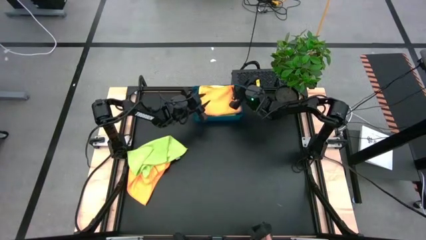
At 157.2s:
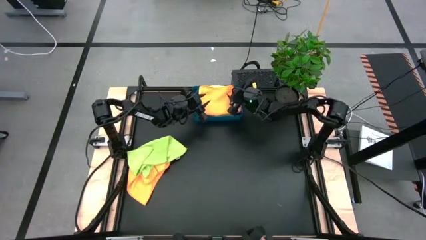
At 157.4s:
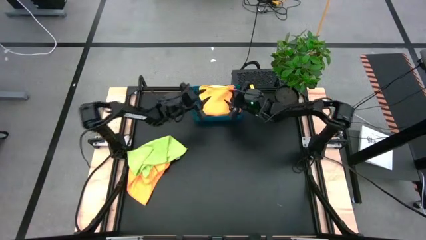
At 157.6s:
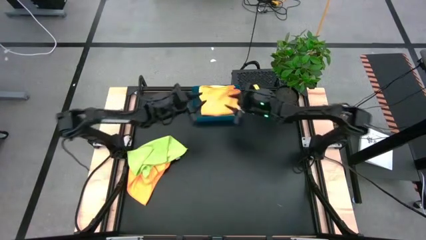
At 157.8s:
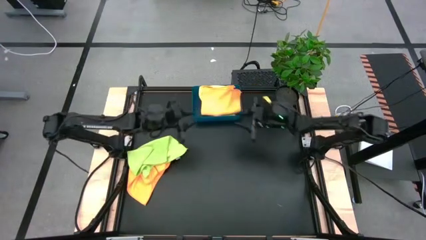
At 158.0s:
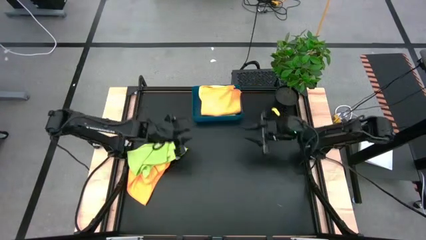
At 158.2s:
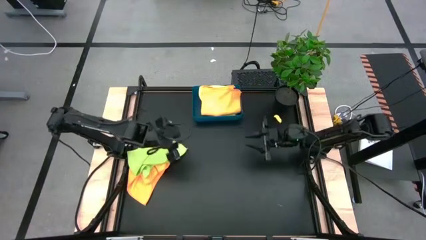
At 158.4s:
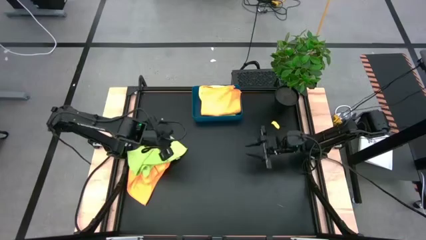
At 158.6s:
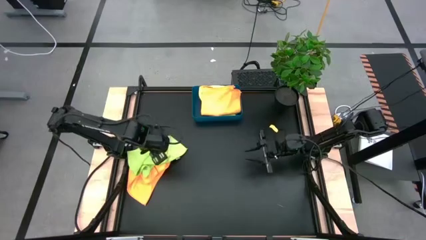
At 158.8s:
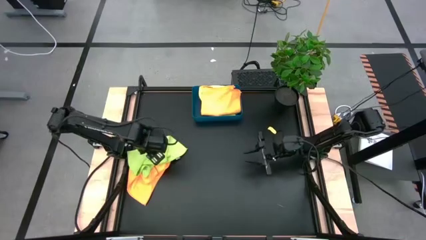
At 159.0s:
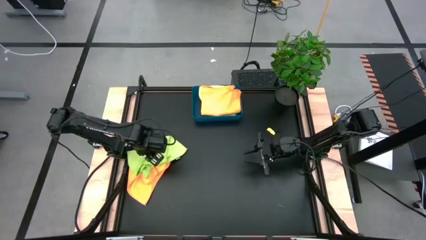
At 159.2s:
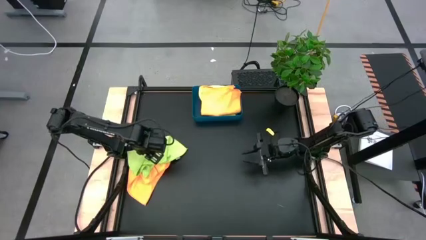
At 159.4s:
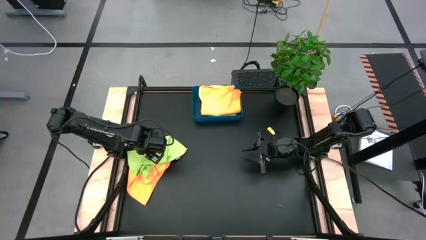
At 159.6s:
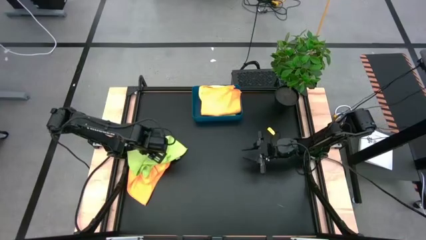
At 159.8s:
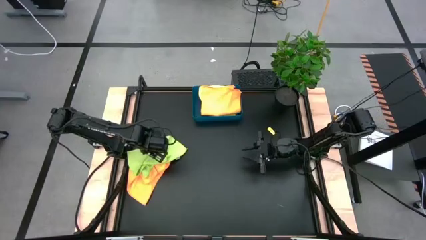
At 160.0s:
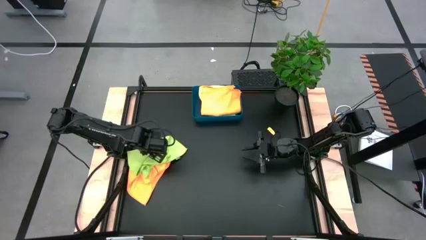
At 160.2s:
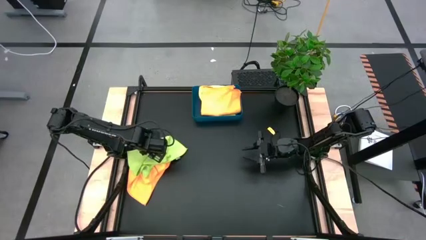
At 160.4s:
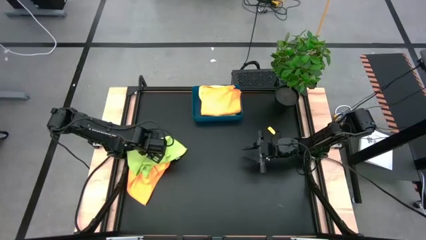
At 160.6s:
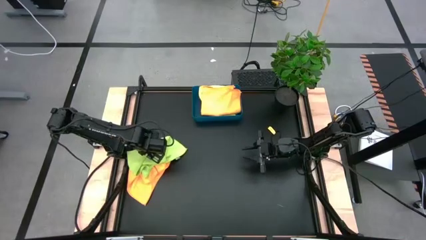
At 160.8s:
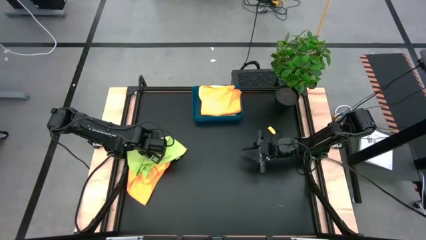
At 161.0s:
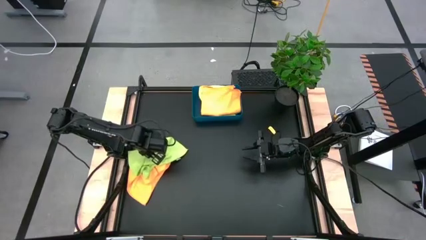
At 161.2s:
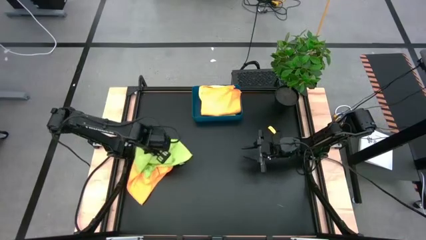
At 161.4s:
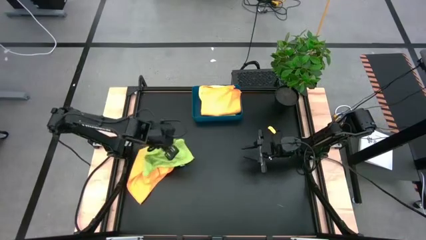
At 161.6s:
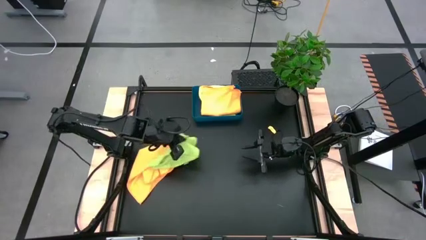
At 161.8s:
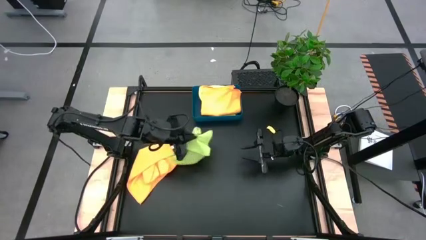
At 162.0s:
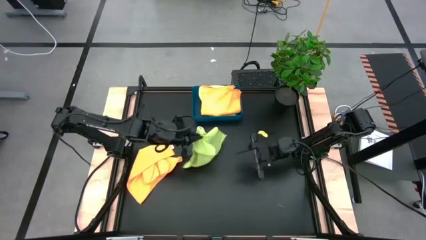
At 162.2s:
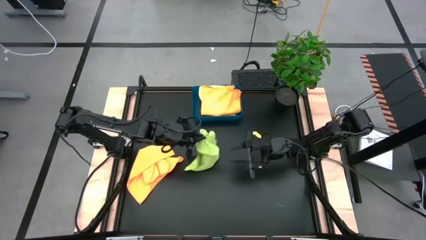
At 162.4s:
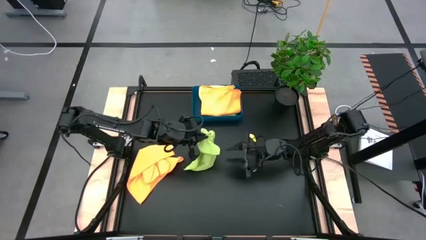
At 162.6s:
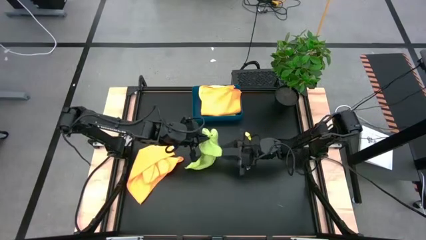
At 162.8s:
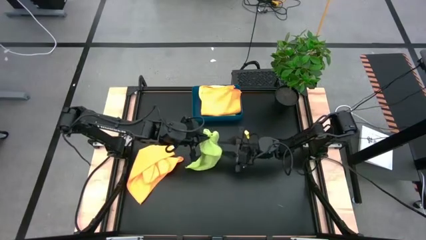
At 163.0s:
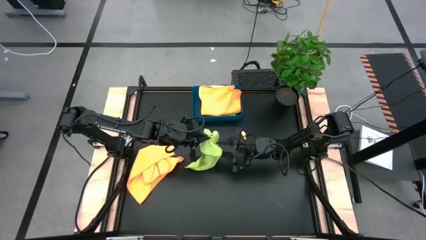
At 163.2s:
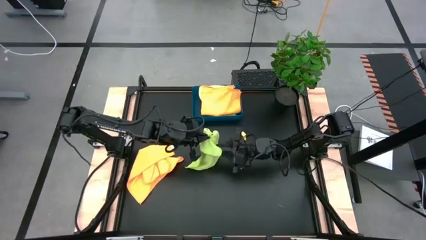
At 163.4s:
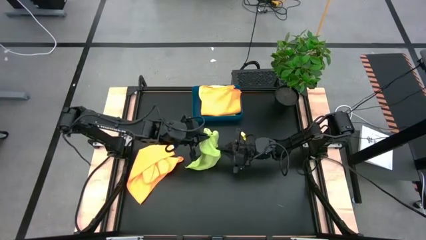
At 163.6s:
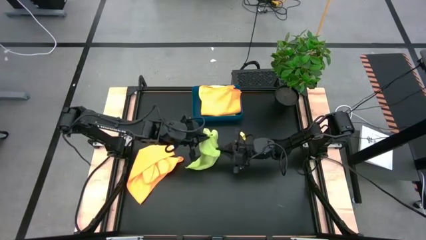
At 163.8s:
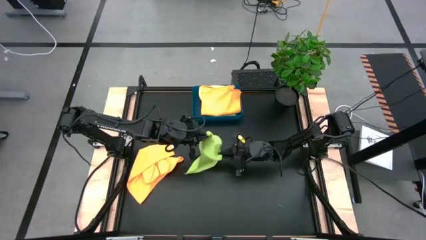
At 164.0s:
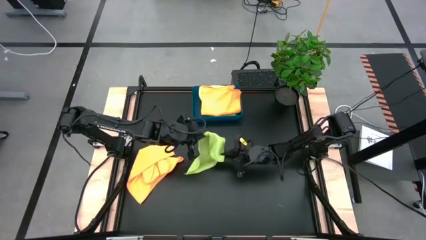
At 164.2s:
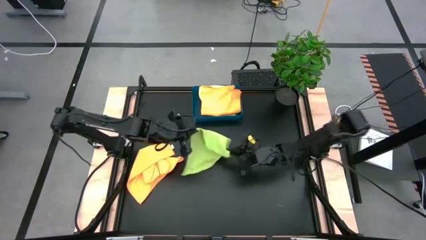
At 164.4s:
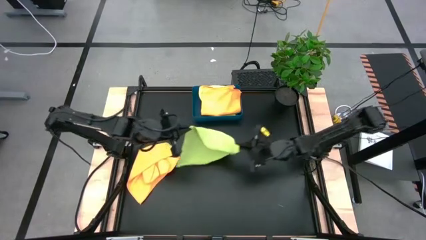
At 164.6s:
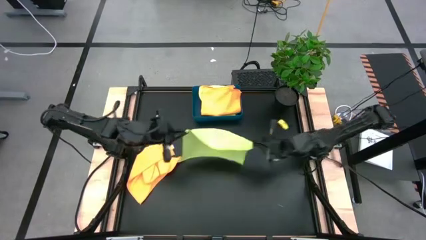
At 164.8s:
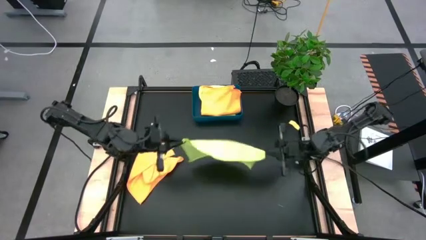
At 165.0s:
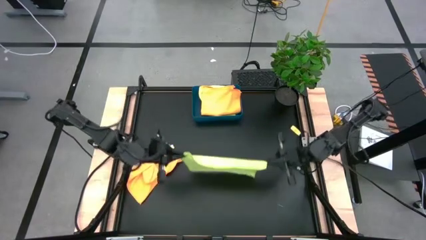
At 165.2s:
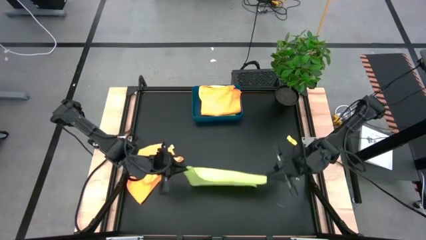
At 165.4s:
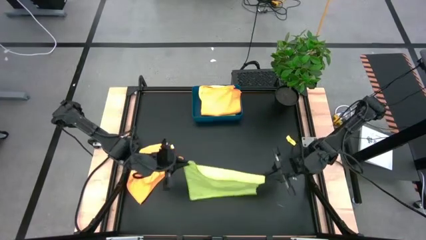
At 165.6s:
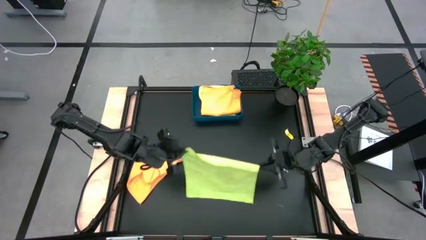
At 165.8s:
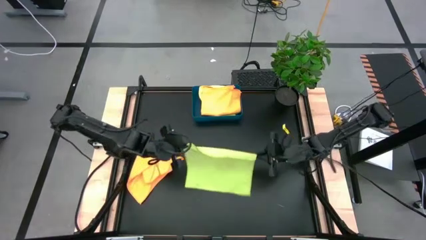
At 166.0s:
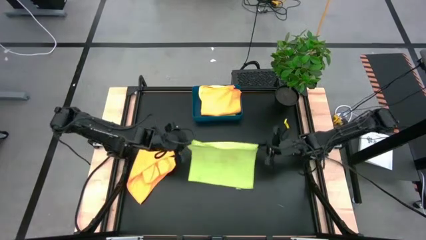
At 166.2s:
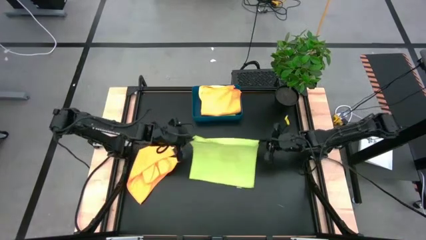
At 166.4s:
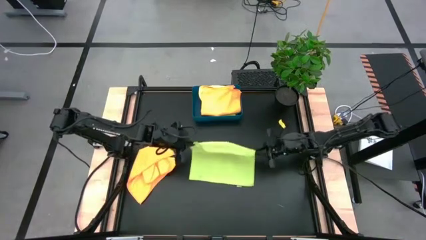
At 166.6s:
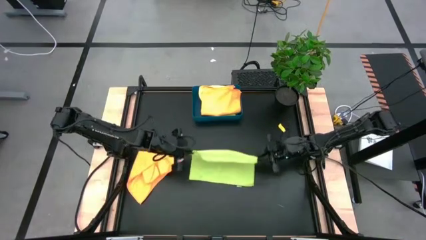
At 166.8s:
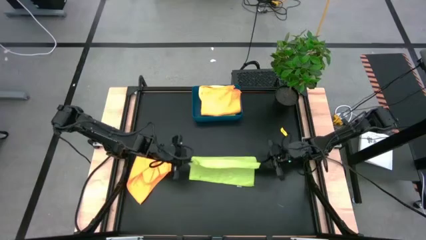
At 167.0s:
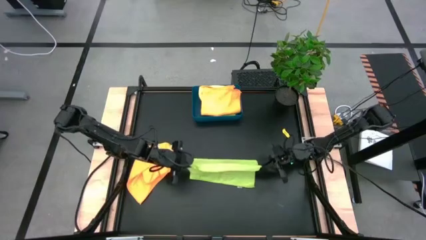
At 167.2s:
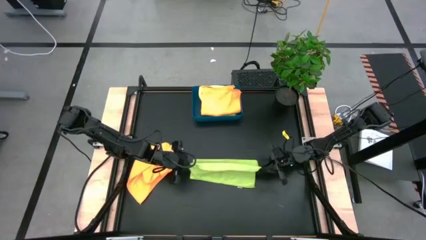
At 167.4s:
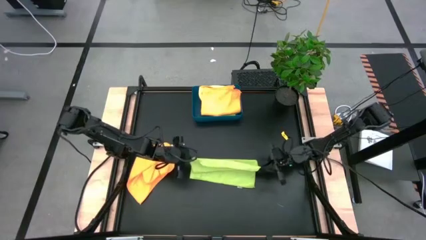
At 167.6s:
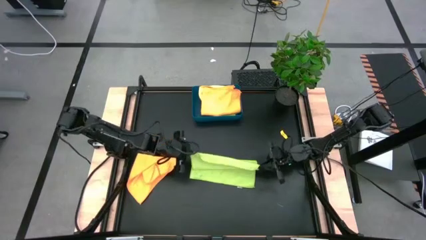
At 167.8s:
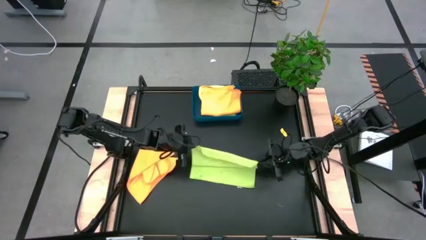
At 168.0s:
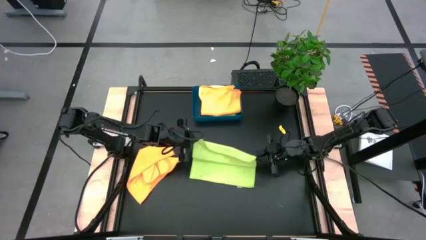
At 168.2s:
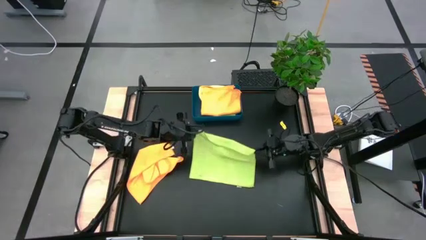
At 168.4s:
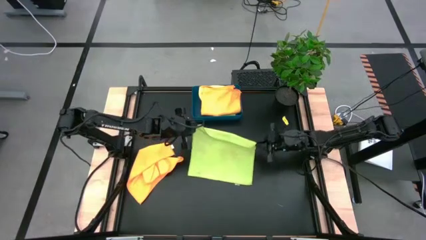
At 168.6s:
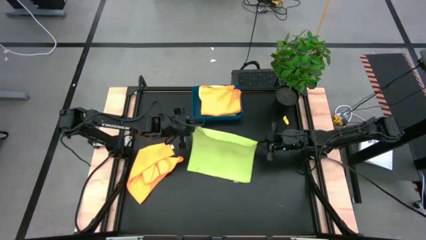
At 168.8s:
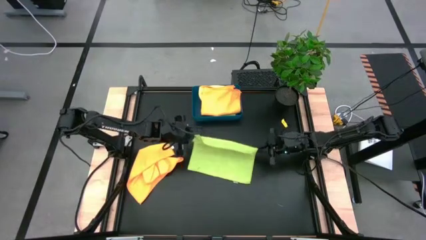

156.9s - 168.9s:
Task: Fold microfiber towels
Fold the green microfiber cloth

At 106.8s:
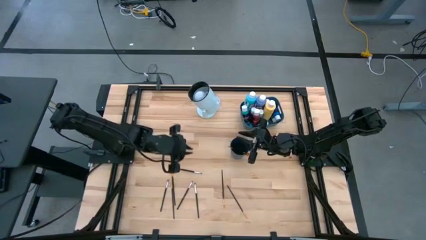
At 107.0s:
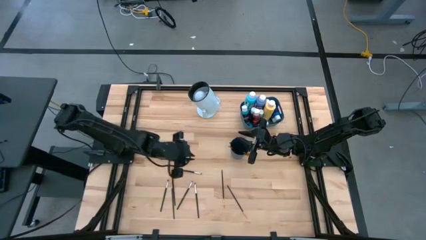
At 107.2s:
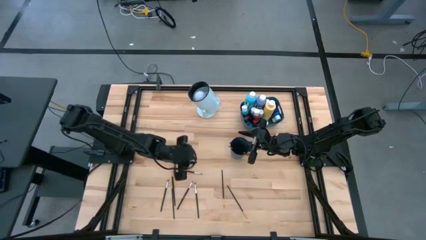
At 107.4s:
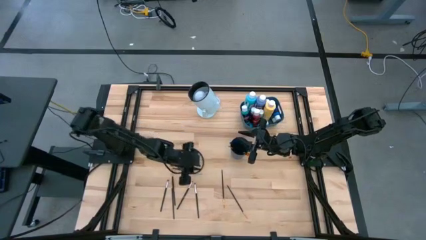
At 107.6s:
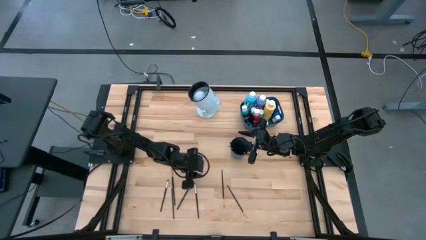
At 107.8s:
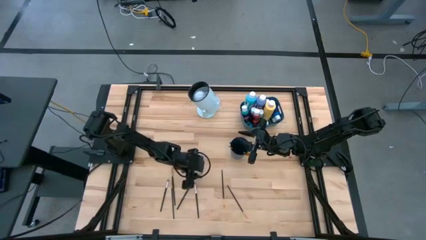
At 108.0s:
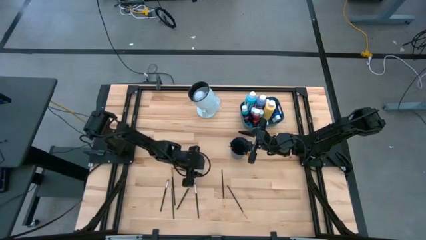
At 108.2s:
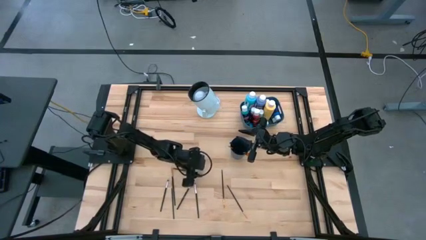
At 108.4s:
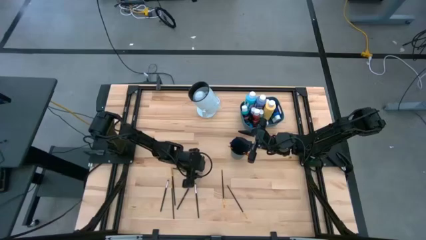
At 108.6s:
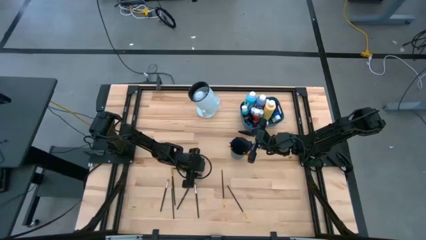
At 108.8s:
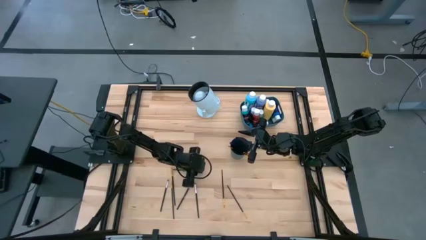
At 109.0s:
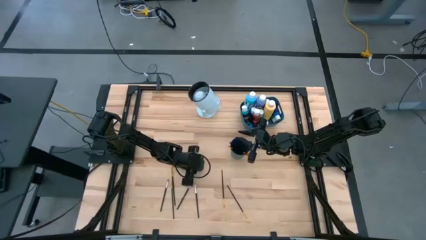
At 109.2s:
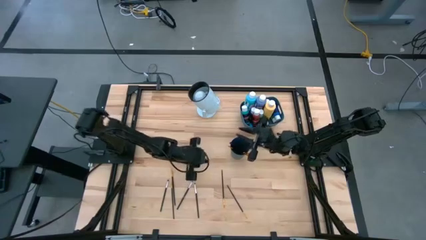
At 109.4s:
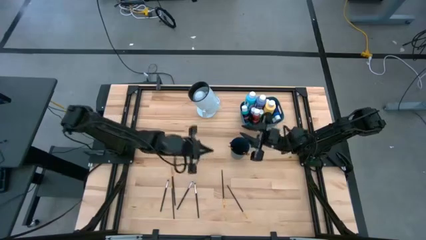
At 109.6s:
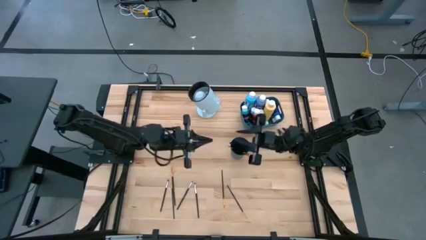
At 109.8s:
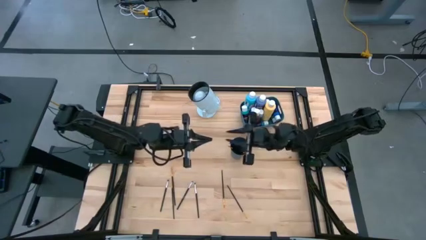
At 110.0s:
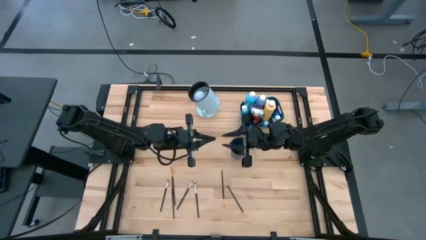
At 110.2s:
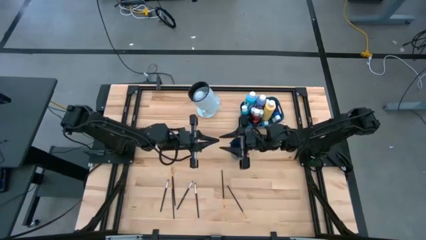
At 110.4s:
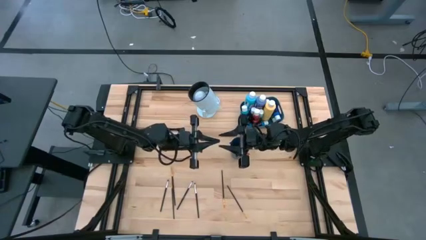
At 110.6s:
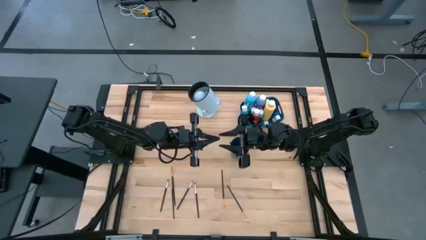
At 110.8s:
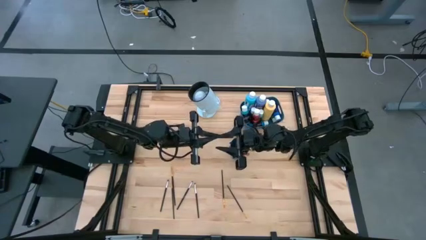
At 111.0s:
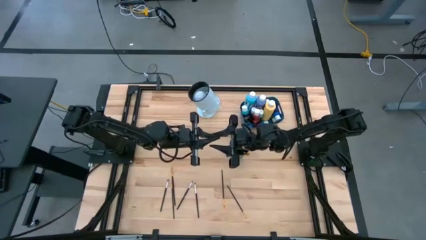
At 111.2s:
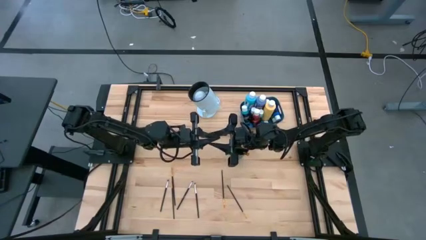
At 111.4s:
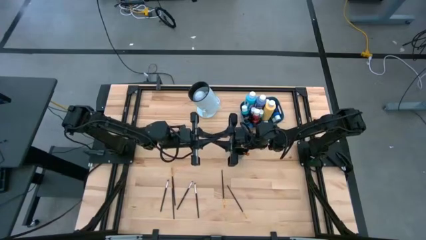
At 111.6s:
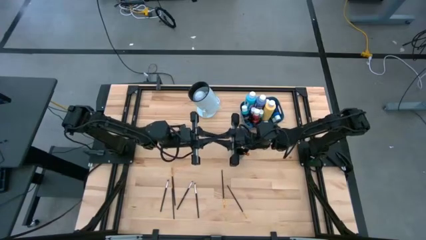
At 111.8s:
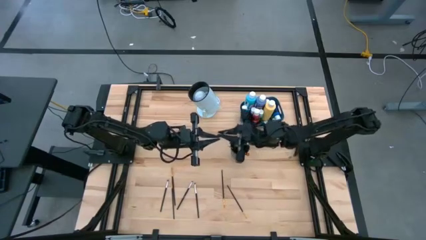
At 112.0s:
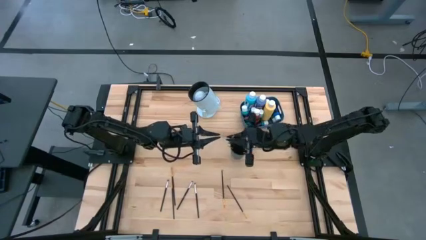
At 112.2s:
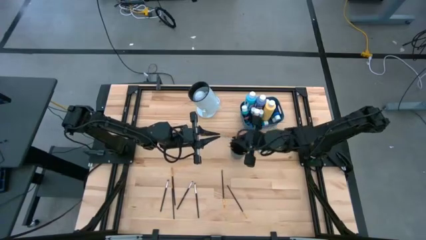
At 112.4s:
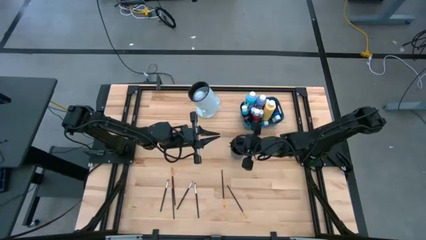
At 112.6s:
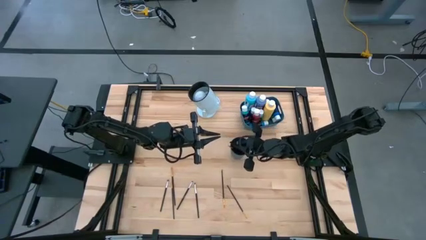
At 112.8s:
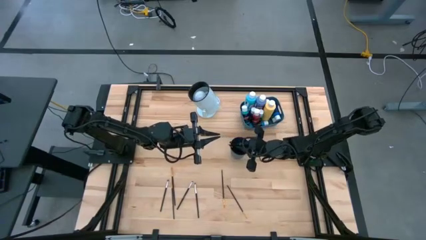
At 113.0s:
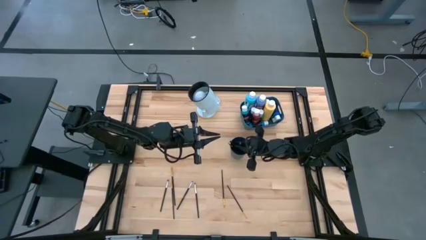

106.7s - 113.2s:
Task: Pick & Place Paint Supplies
Put the silver paintbrush into the blue cup
